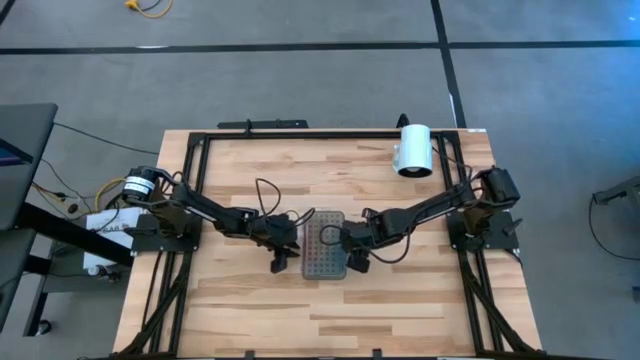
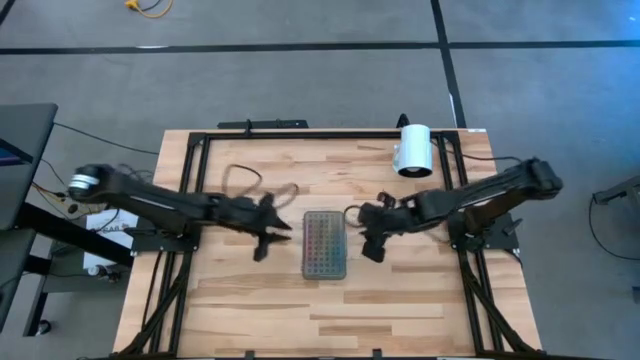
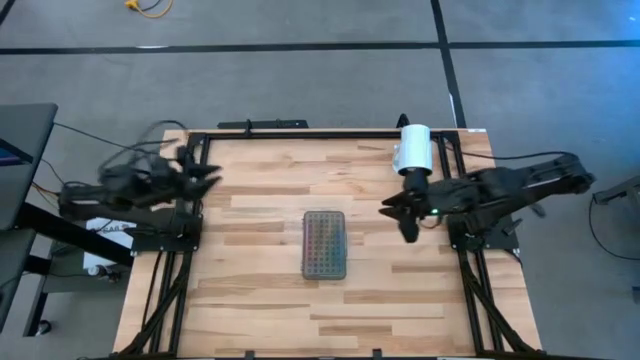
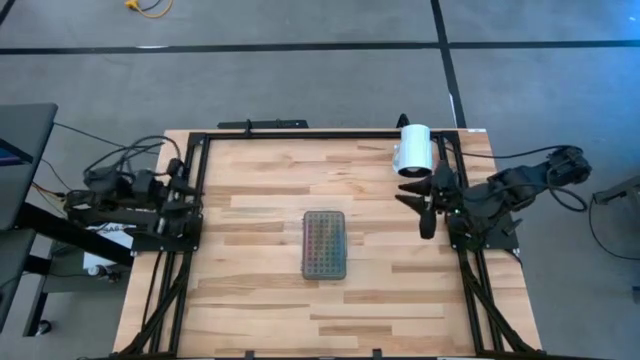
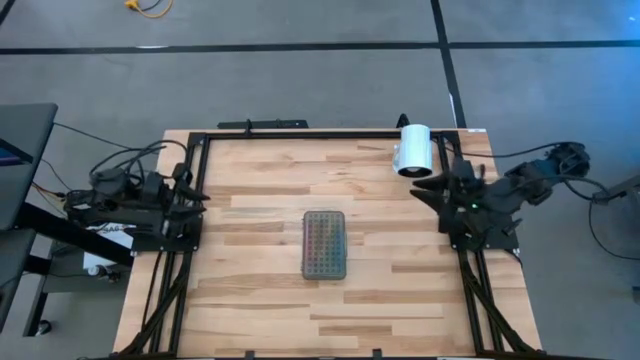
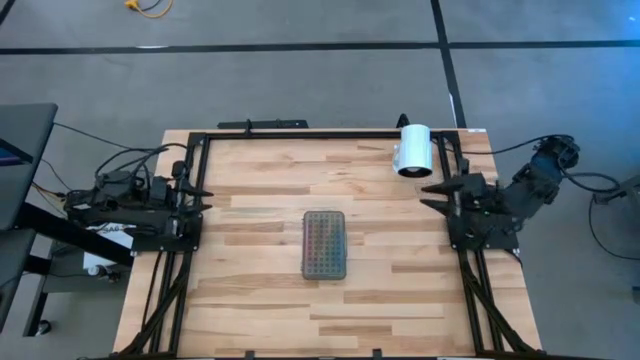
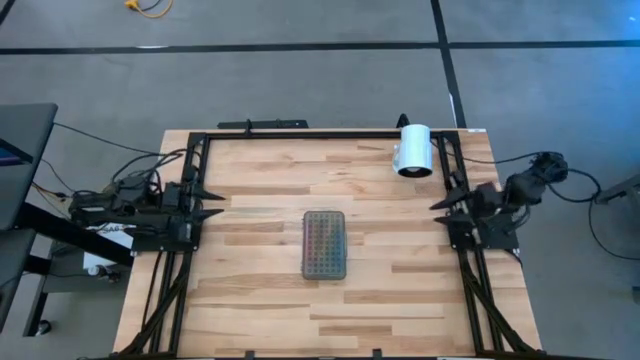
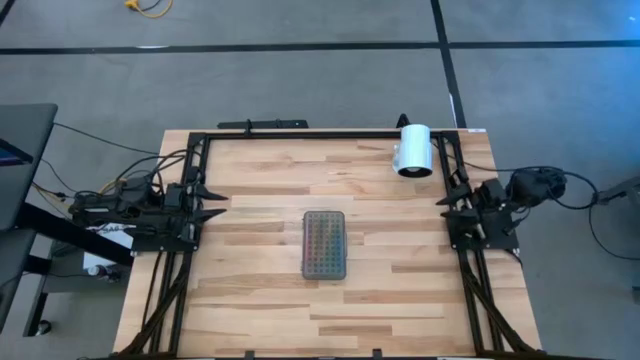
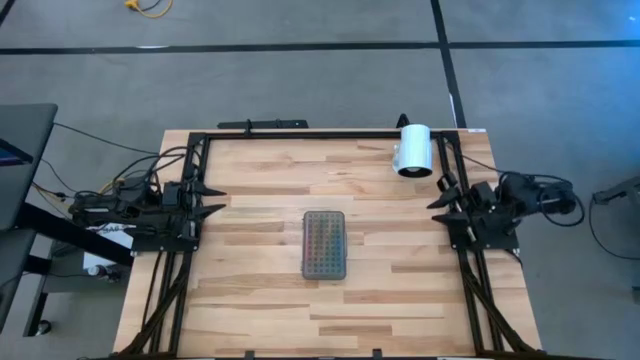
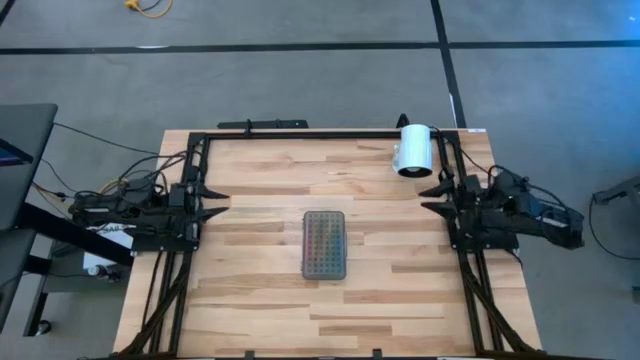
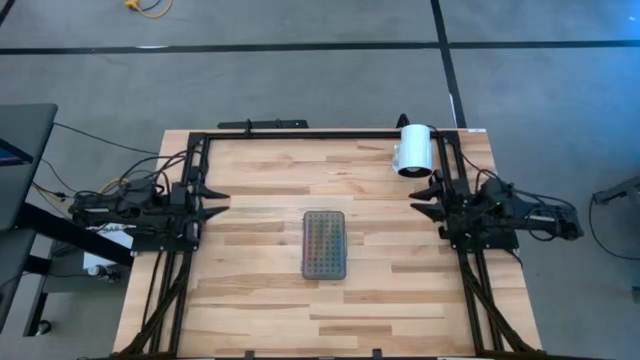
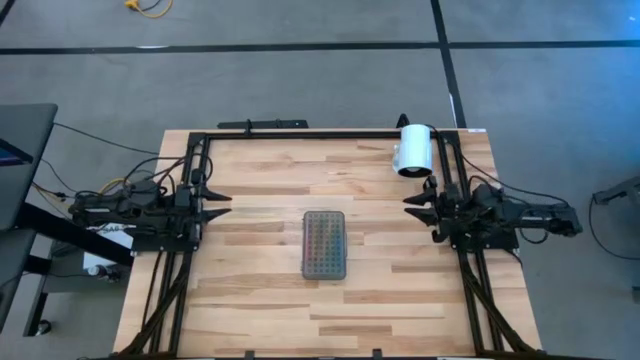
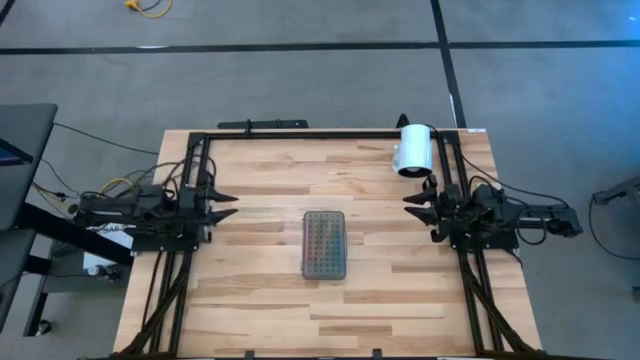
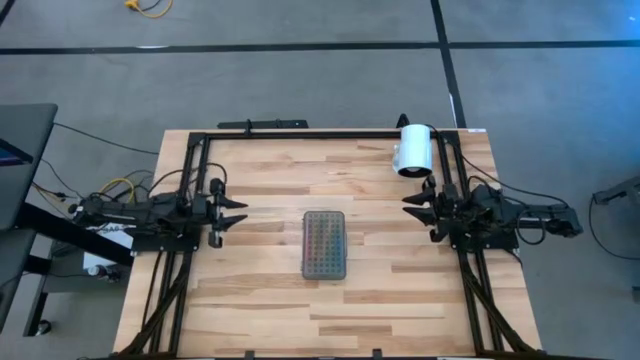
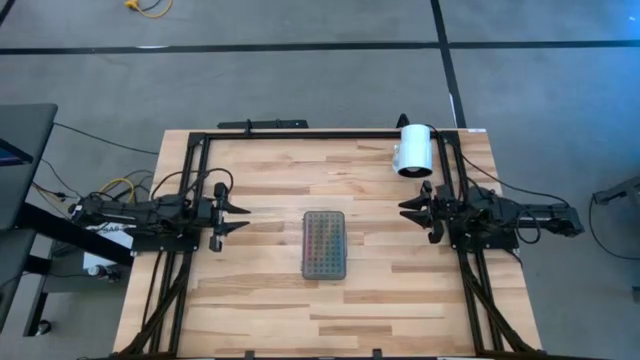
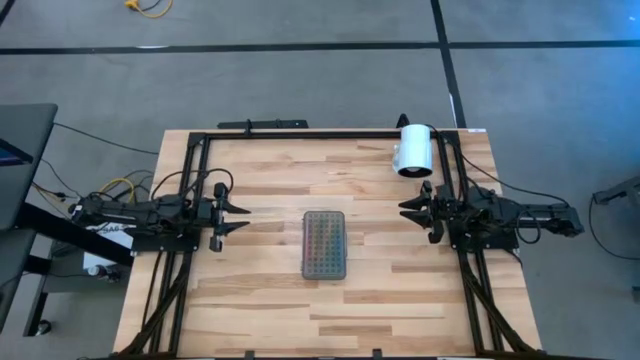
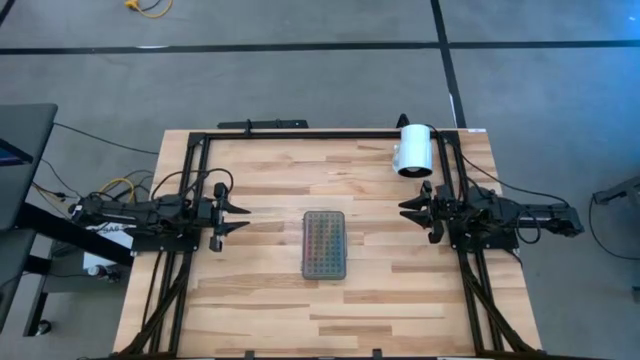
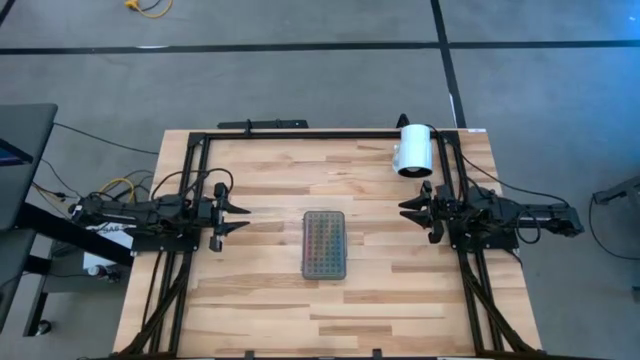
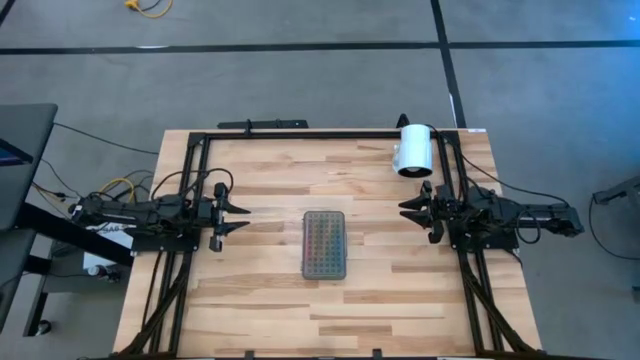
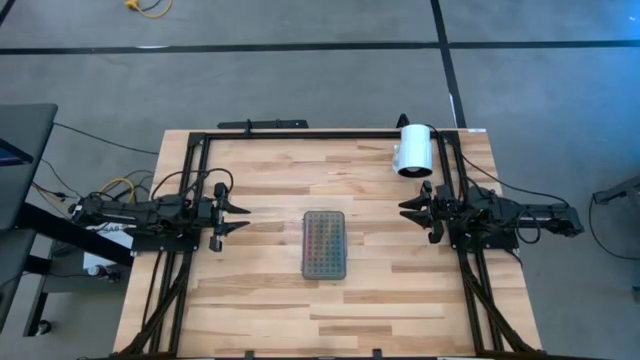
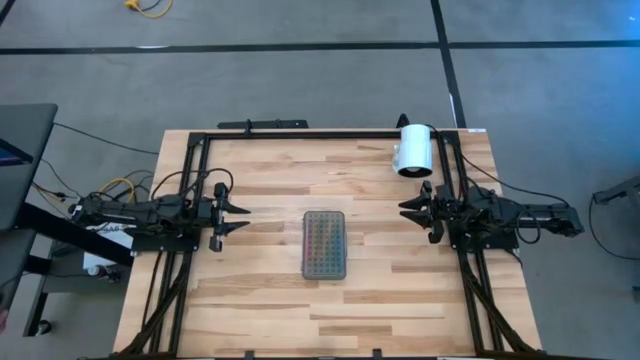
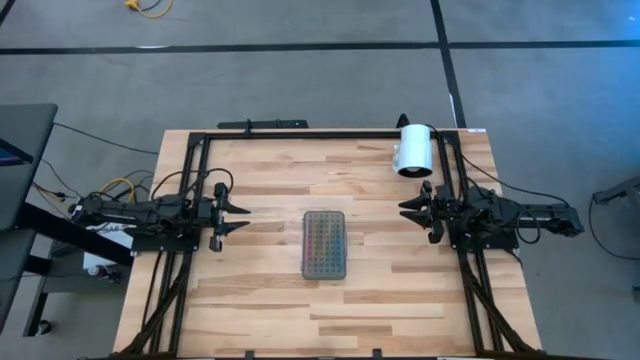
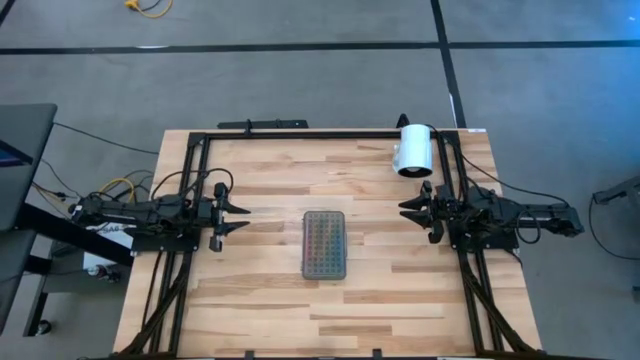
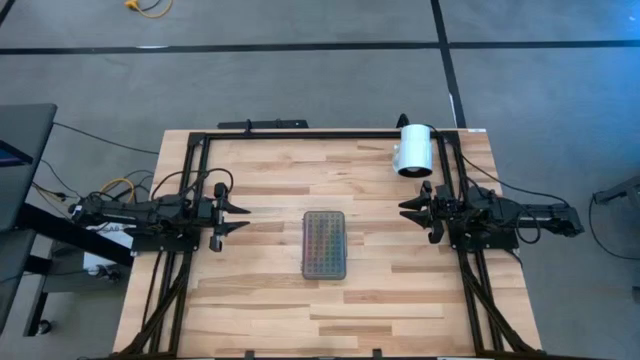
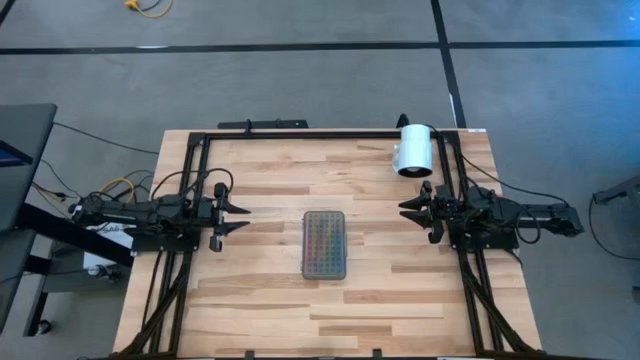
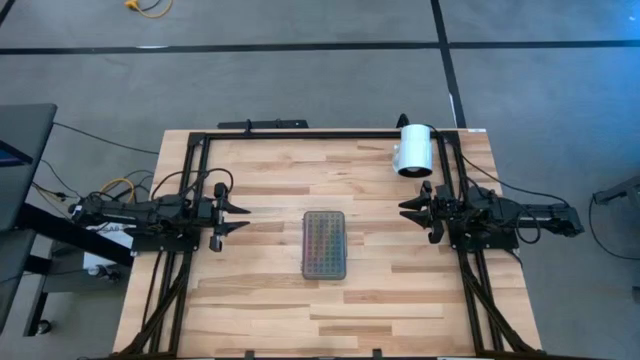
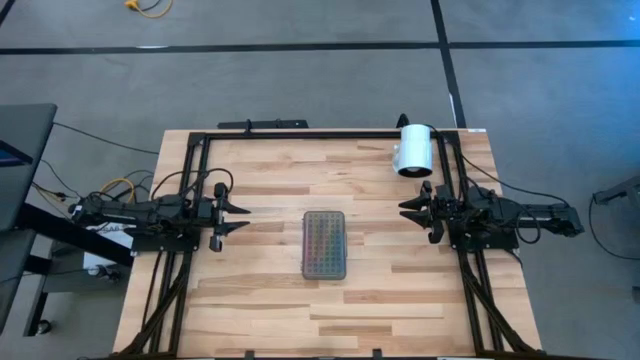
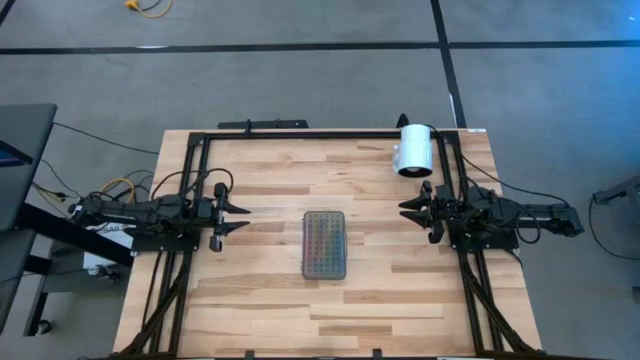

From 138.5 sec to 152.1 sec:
Task: Pick & place school supplies into a supply box
Return to Home Position

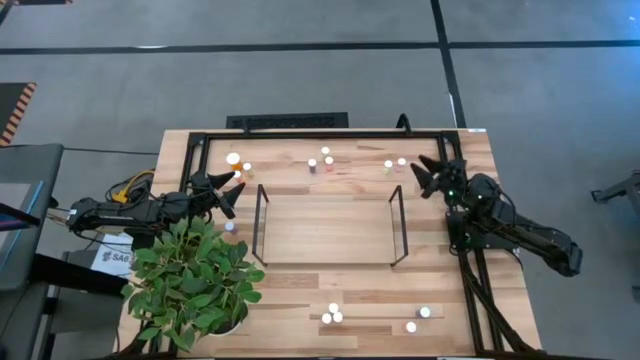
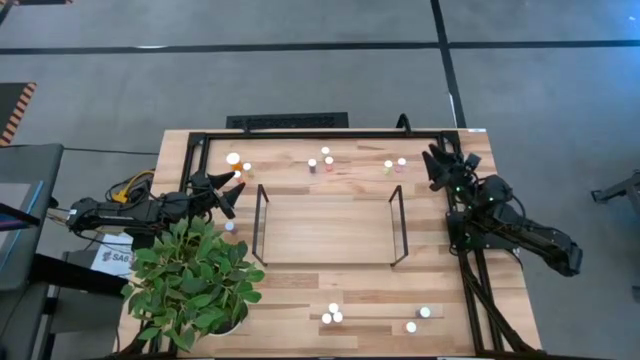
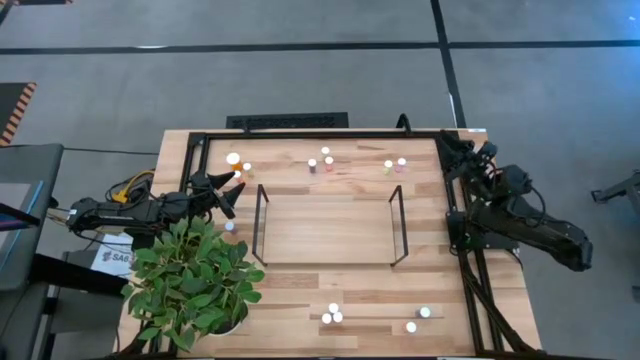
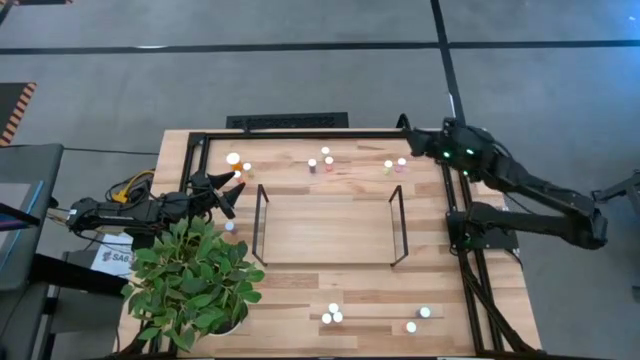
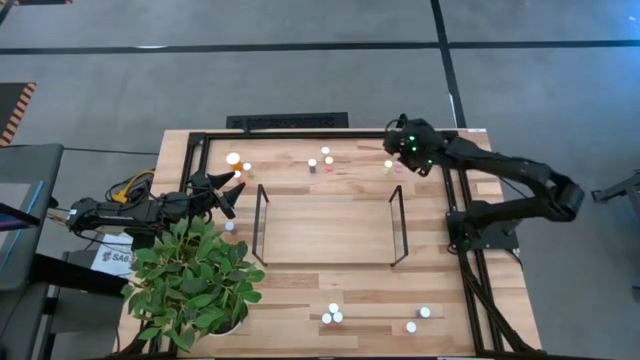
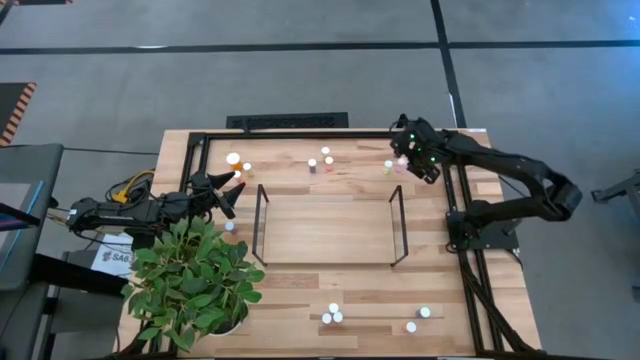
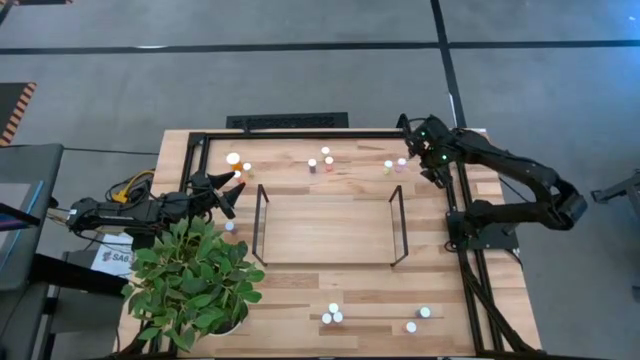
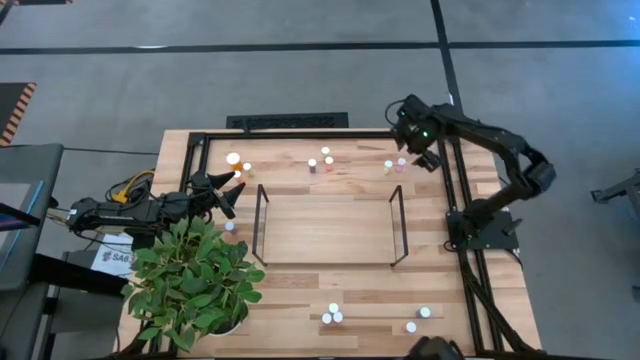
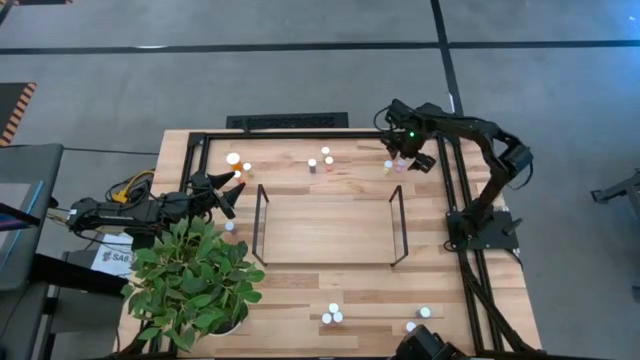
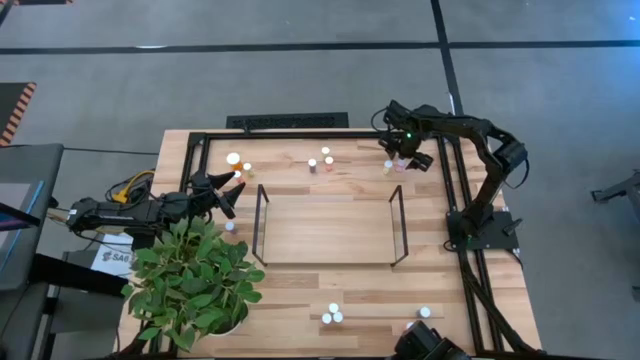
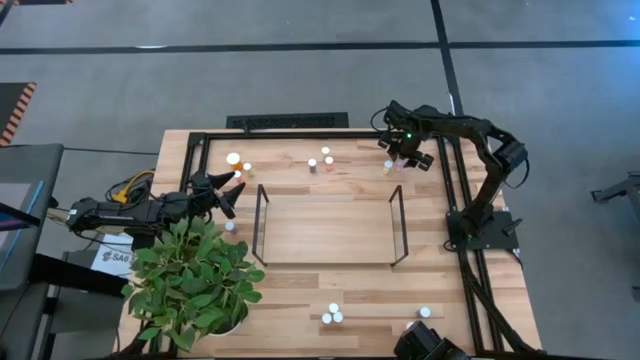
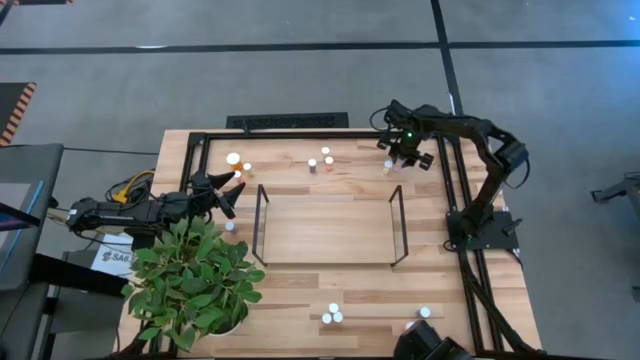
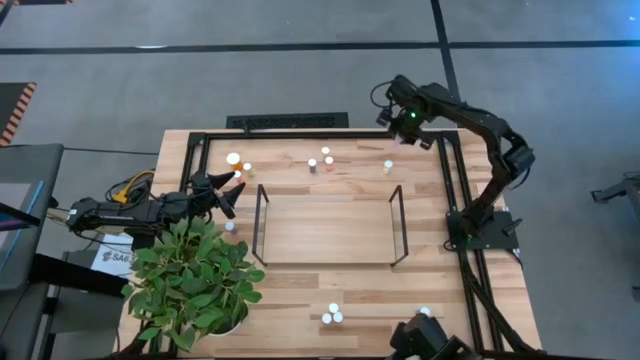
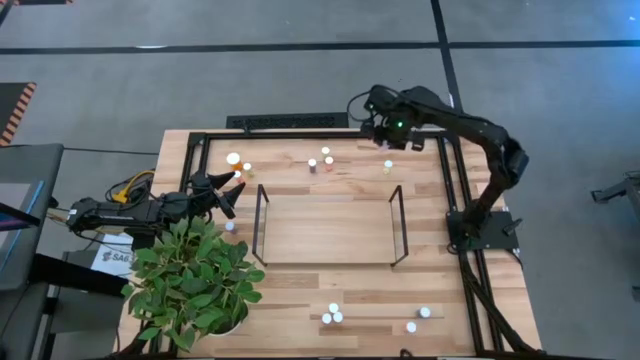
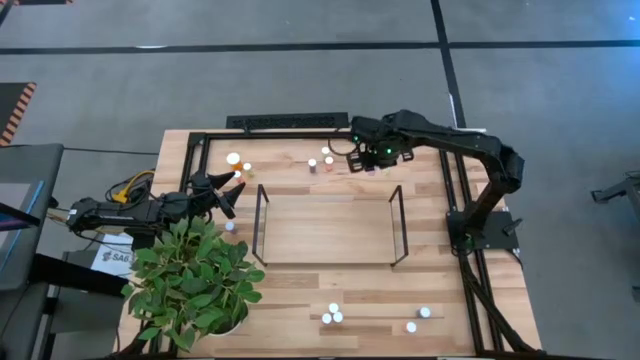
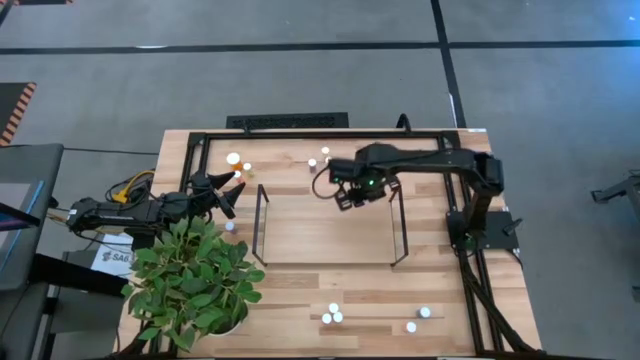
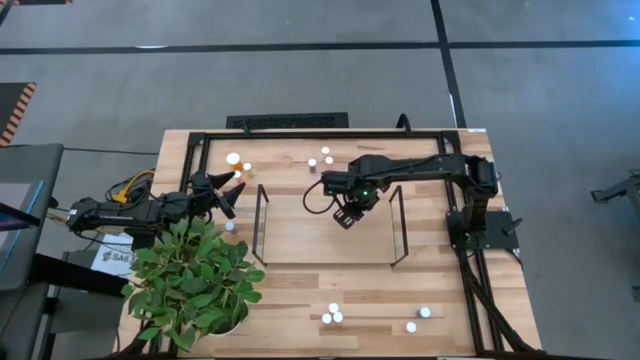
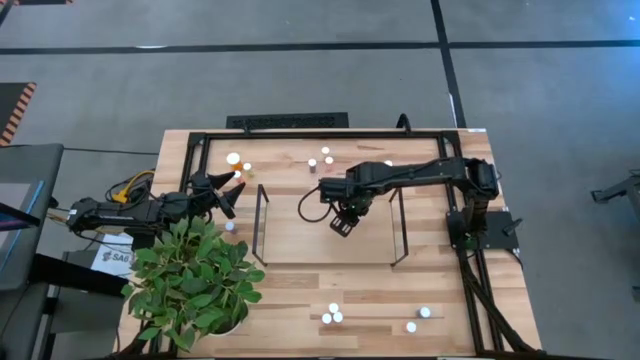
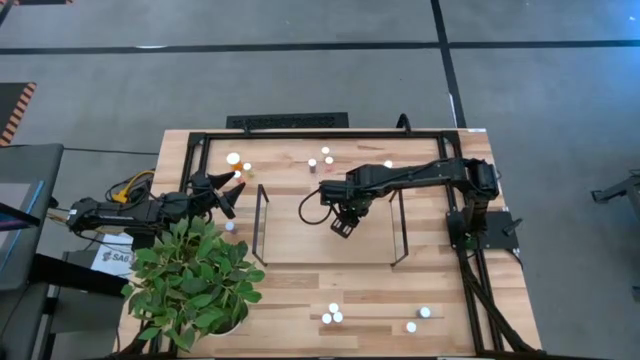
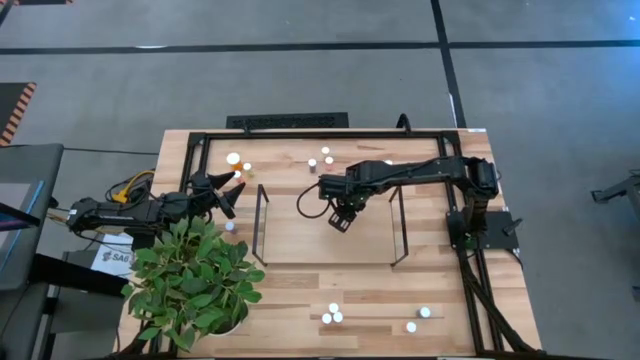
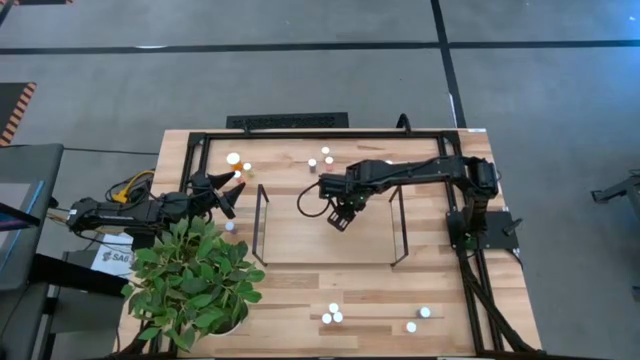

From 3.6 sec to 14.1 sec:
Task: Pick and place medicine bottles onto shelf by color
Put the pink pill bottle on the shelf
